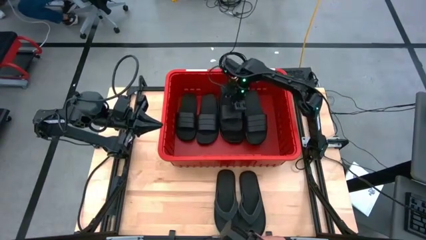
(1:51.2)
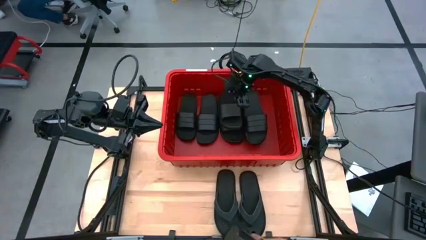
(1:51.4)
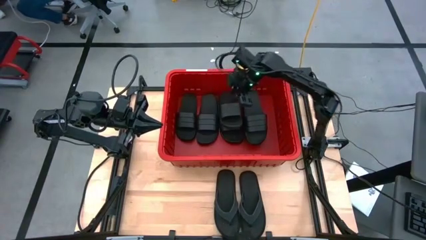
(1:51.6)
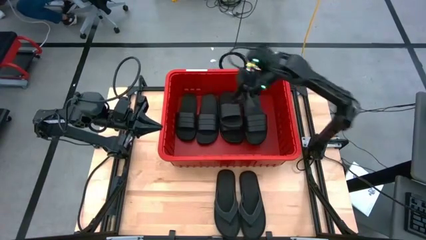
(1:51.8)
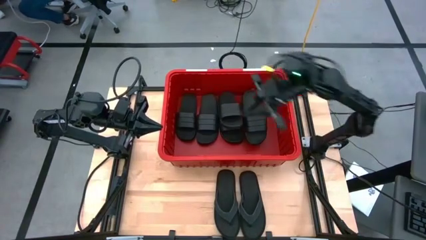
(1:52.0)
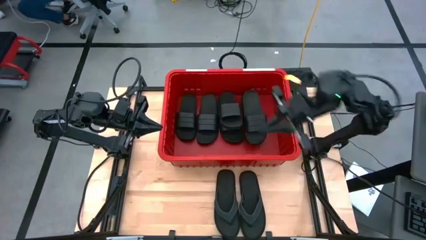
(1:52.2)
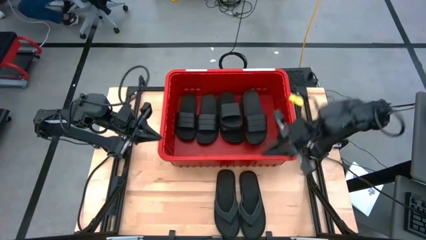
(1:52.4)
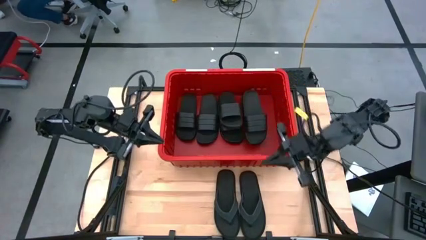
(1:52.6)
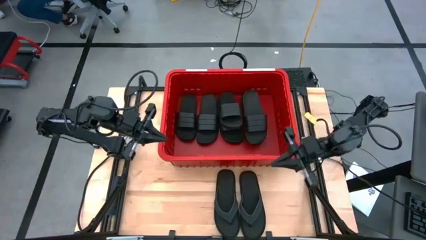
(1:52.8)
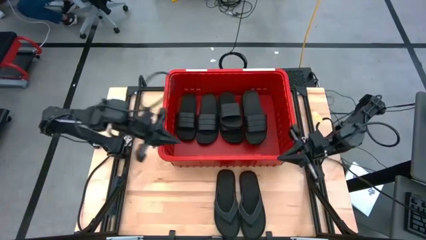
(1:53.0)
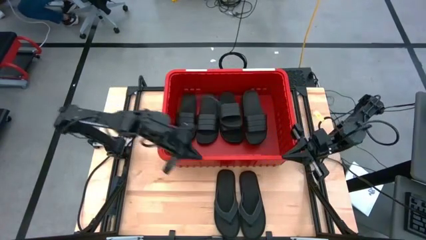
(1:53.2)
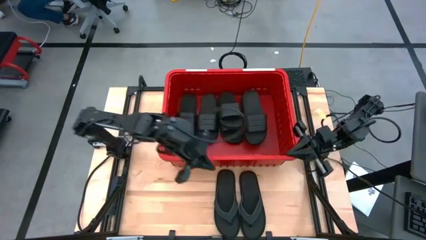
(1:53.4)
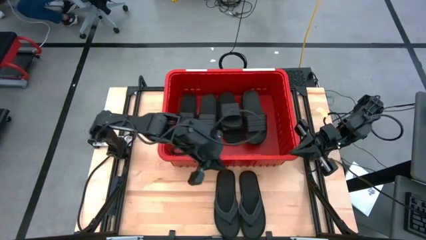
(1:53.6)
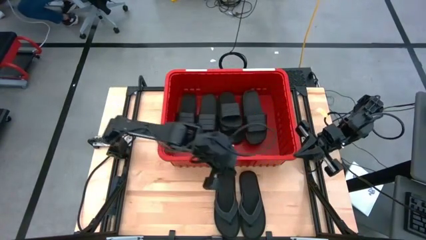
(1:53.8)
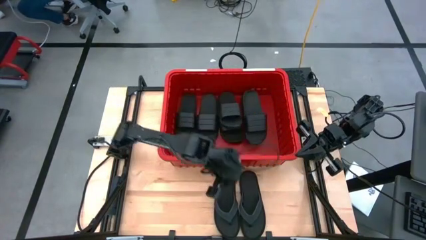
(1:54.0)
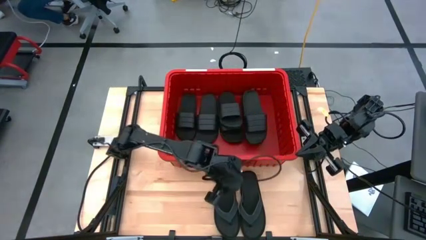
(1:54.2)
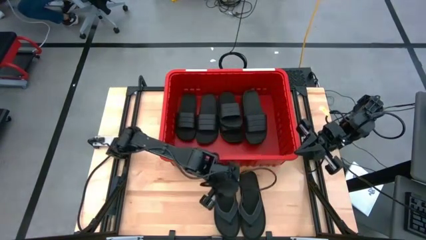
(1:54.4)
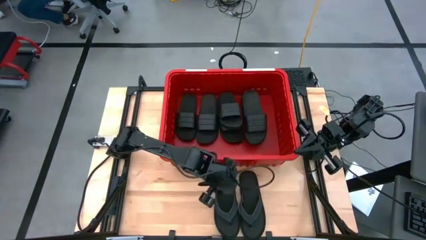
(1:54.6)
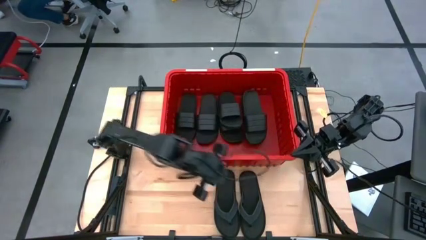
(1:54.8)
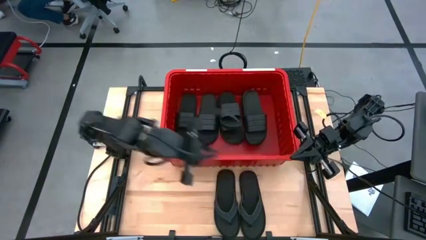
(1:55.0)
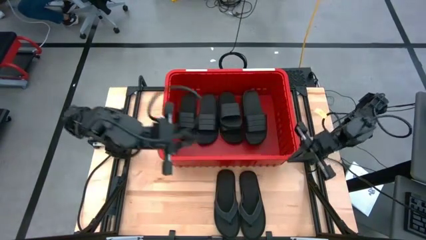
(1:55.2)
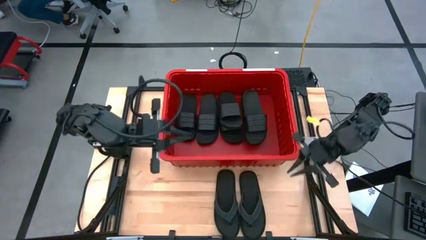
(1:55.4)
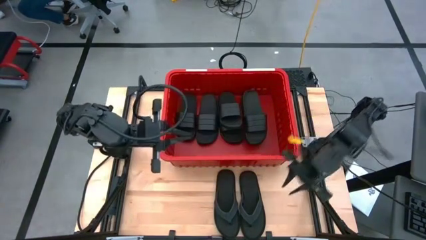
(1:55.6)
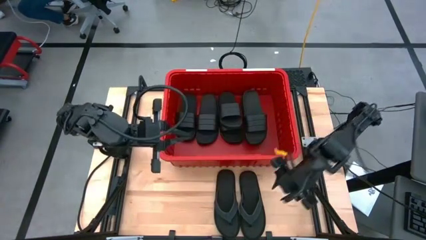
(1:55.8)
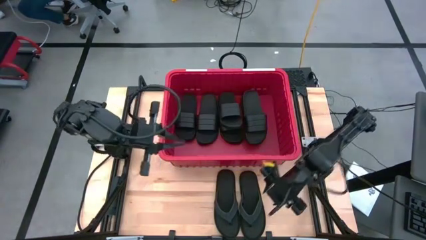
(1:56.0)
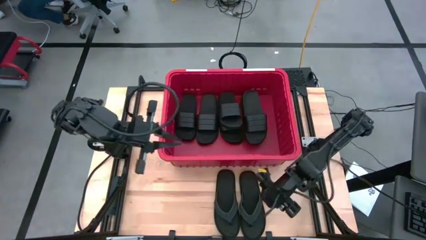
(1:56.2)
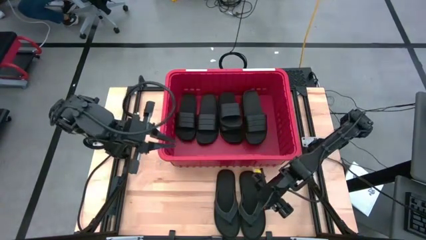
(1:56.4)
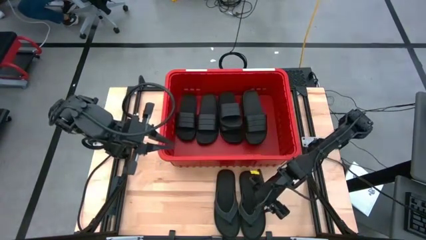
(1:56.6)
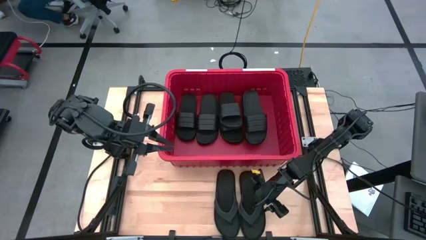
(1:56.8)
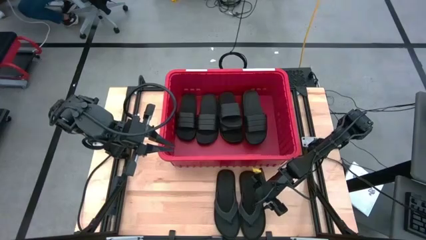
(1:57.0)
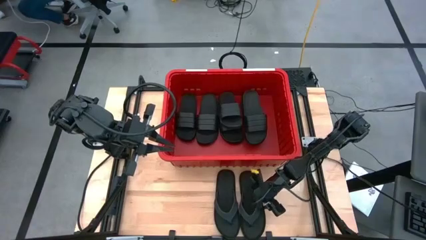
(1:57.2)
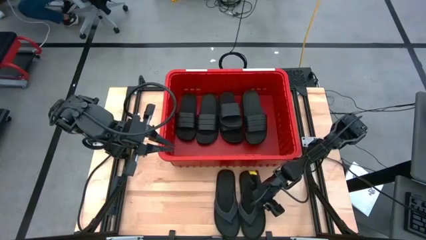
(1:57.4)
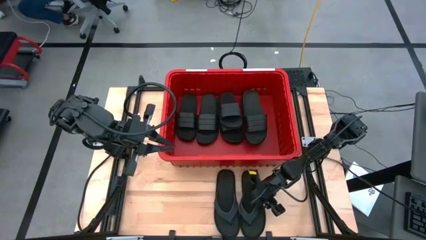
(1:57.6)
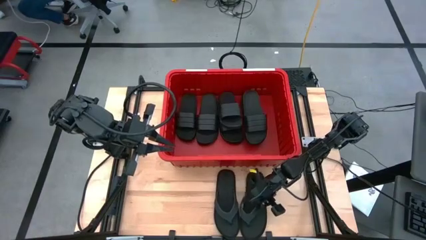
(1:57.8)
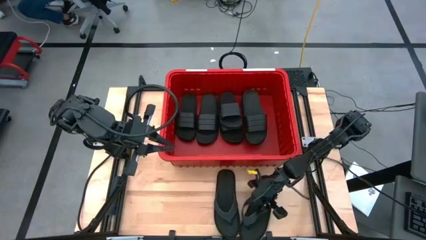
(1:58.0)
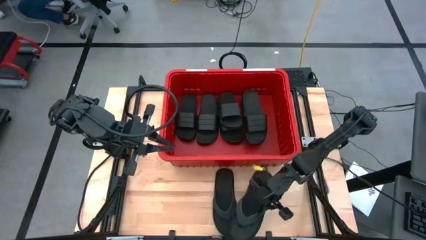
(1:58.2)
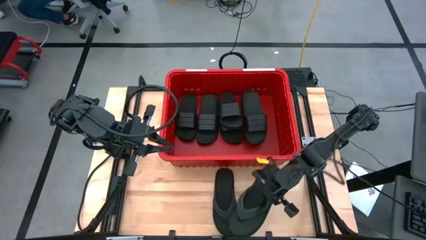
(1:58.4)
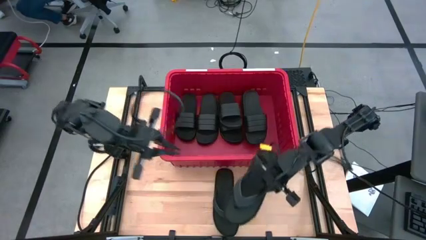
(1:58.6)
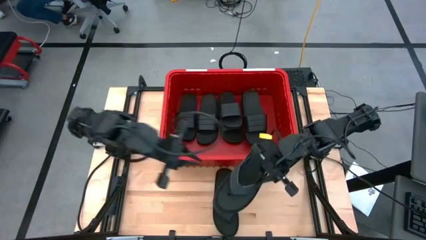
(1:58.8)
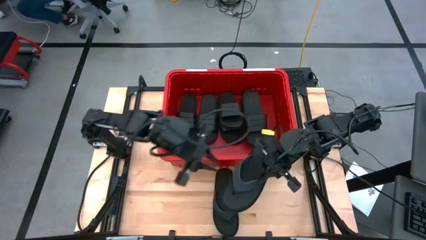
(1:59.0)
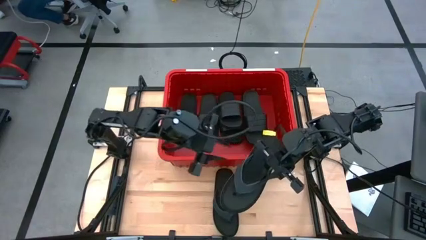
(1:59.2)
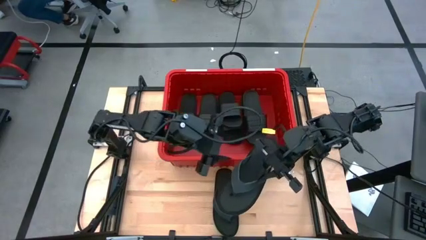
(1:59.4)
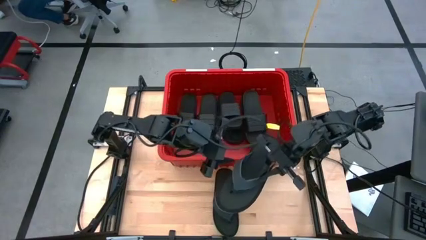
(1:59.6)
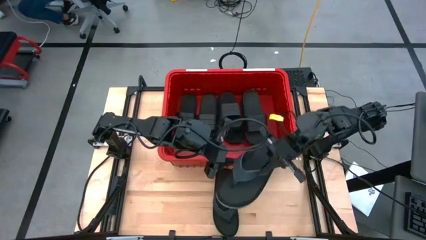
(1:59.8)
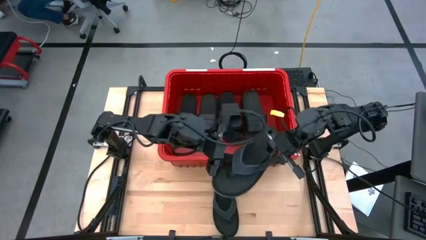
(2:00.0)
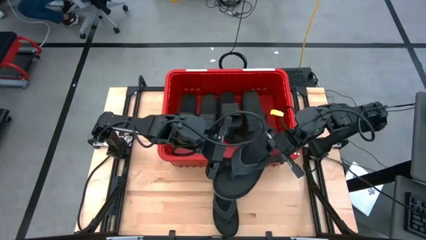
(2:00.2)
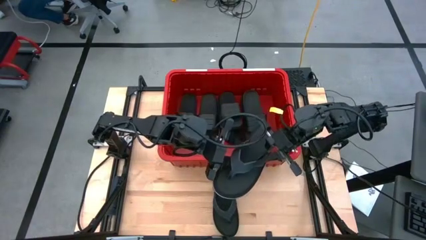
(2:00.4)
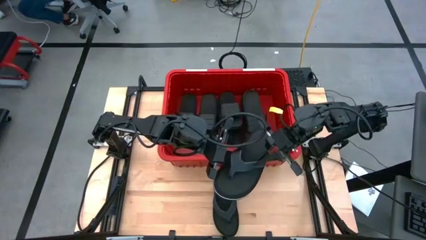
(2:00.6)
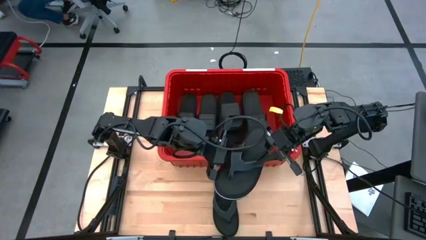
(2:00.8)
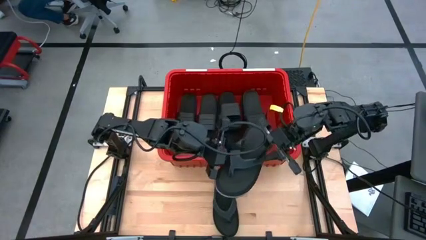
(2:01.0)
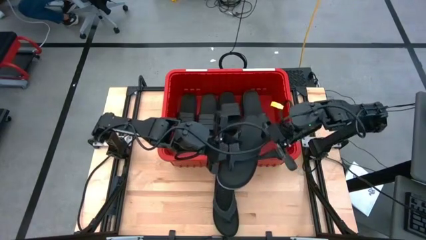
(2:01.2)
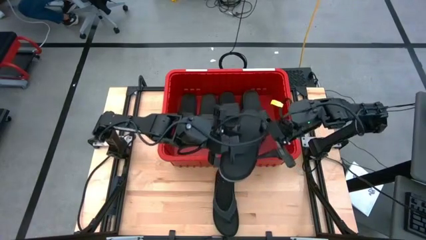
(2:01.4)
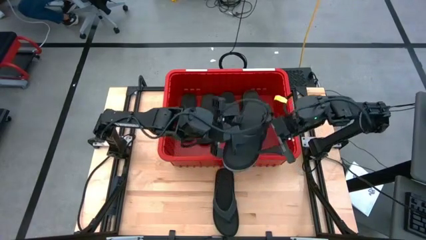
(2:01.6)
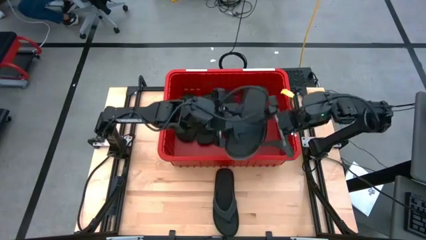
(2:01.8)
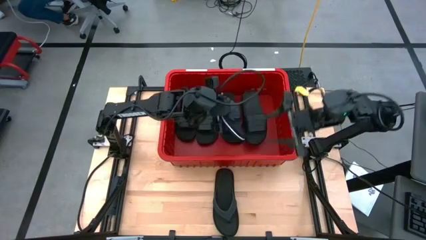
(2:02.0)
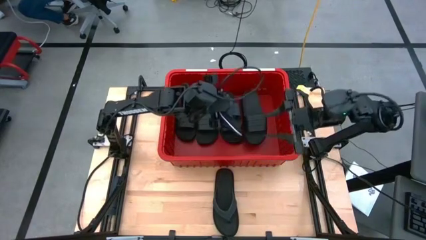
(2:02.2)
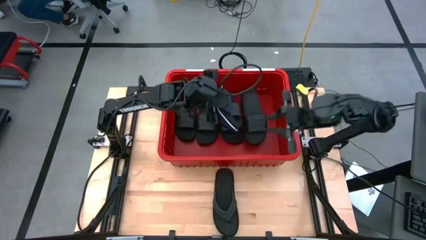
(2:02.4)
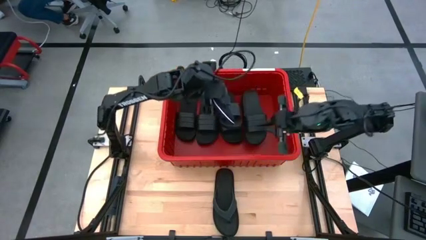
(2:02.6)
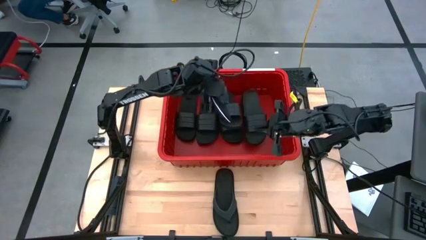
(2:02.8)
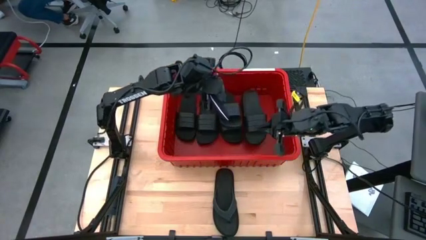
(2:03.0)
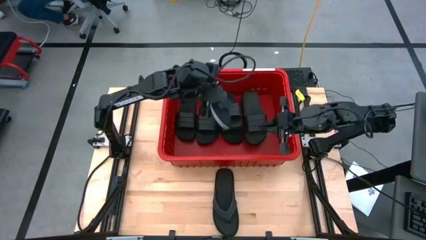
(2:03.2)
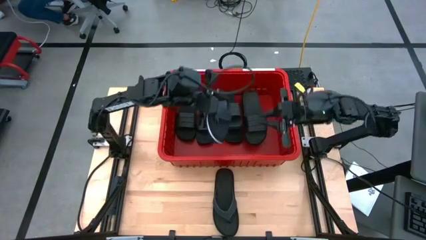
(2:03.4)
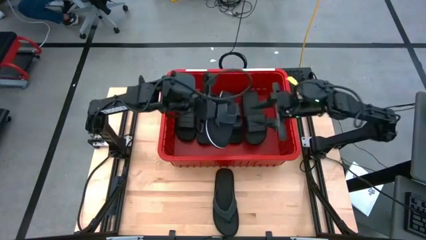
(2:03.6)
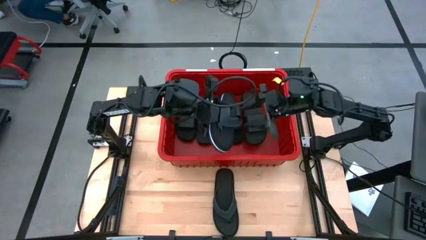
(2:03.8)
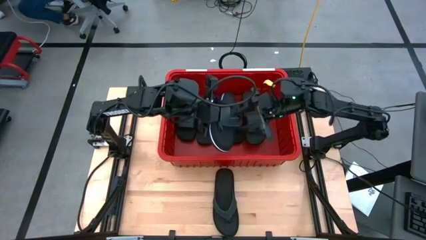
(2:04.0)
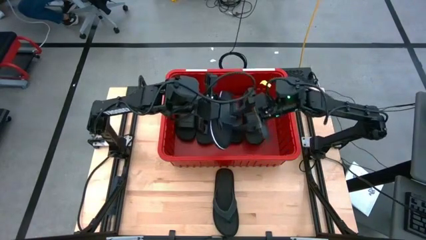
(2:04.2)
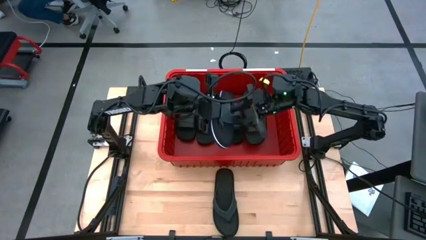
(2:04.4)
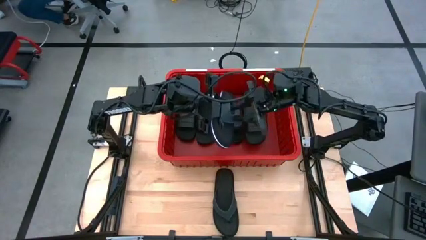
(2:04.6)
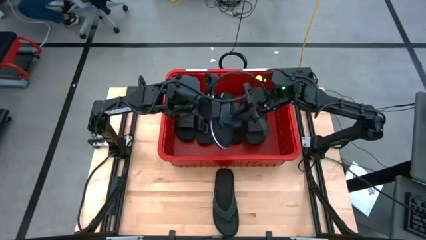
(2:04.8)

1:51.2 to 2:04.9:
Task: Pick and place slides into bin
Put the black slides into the red bin
